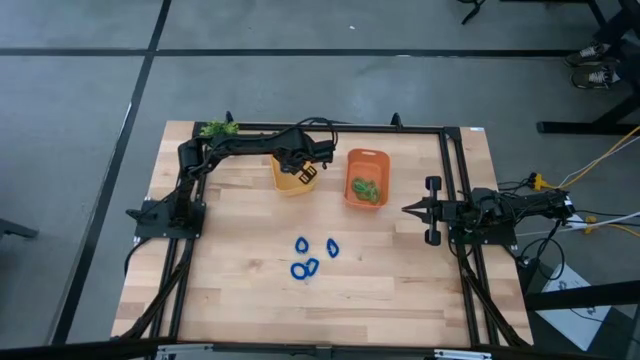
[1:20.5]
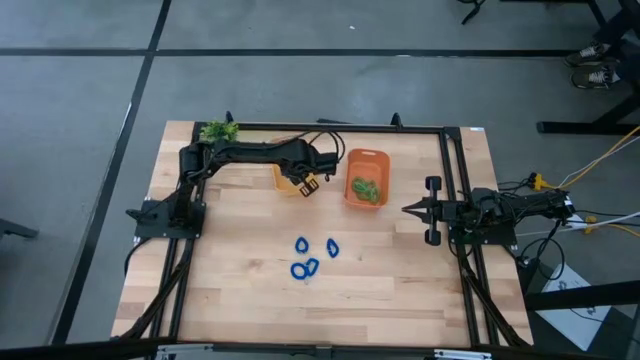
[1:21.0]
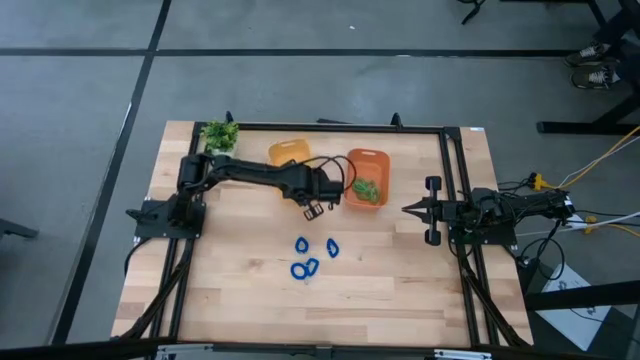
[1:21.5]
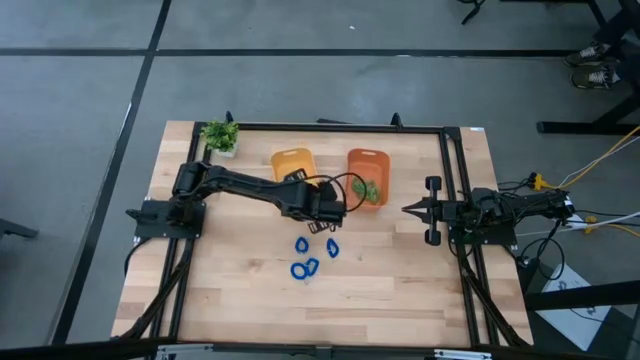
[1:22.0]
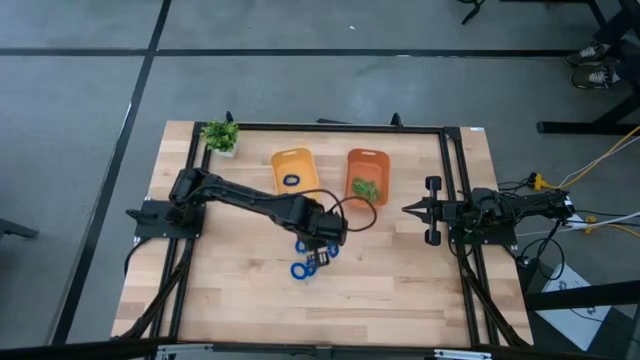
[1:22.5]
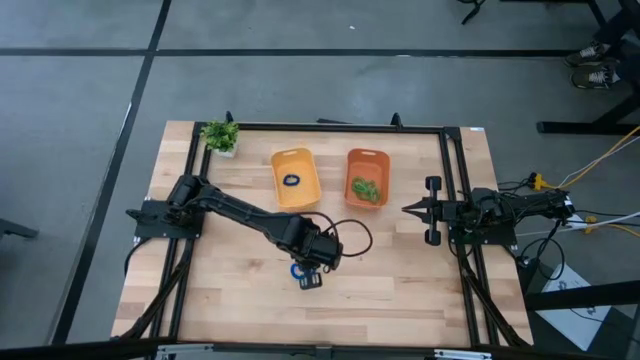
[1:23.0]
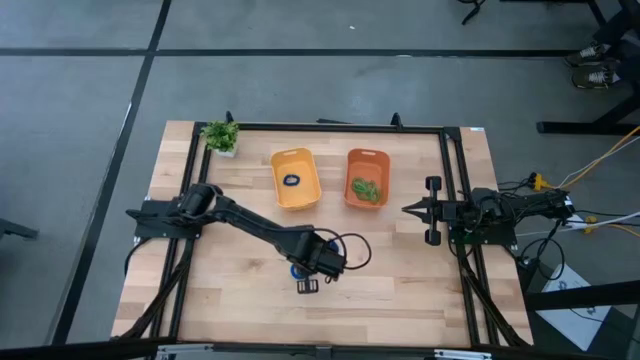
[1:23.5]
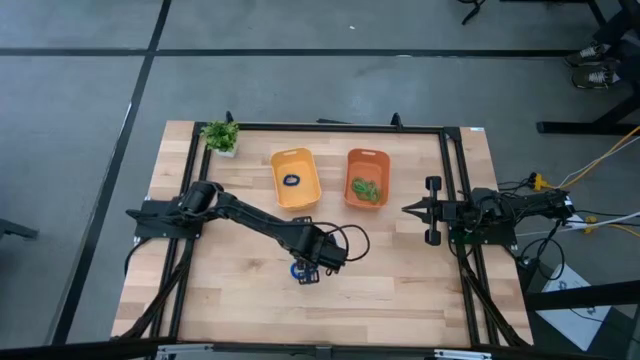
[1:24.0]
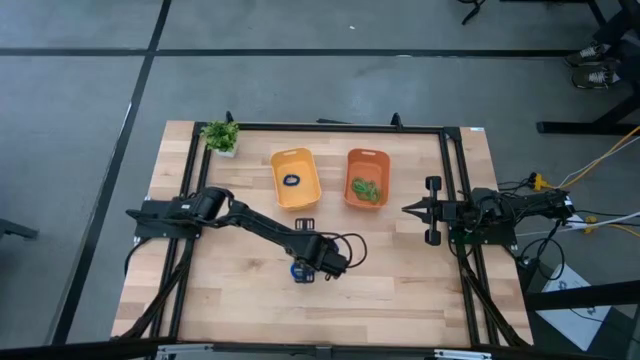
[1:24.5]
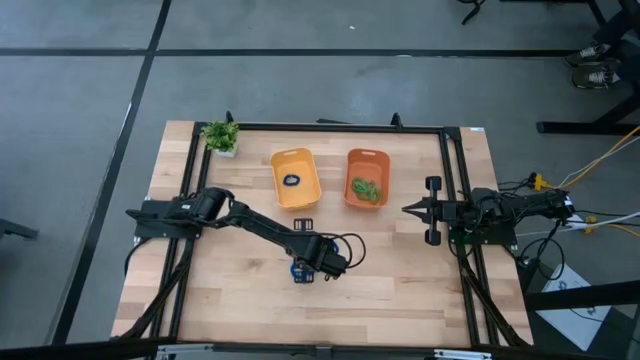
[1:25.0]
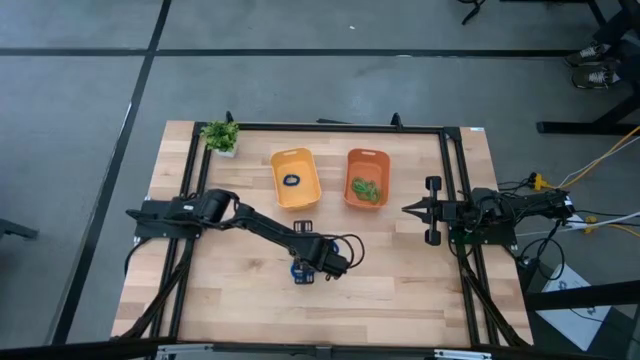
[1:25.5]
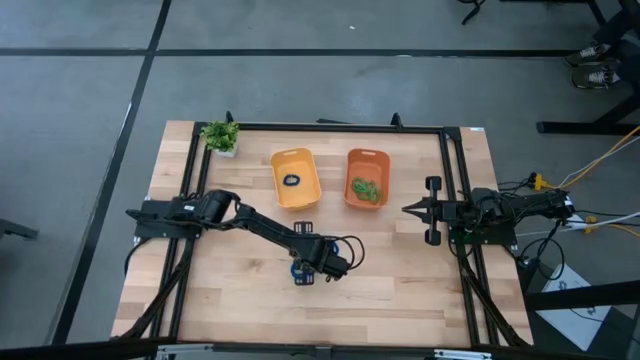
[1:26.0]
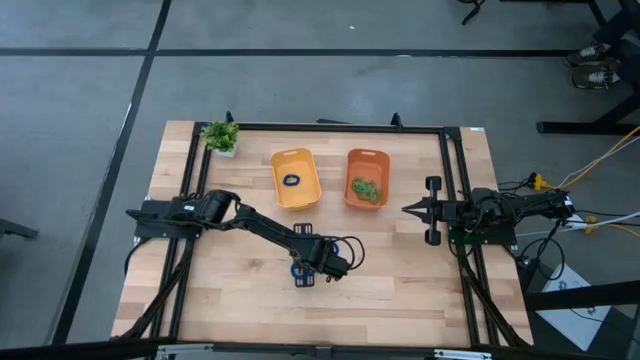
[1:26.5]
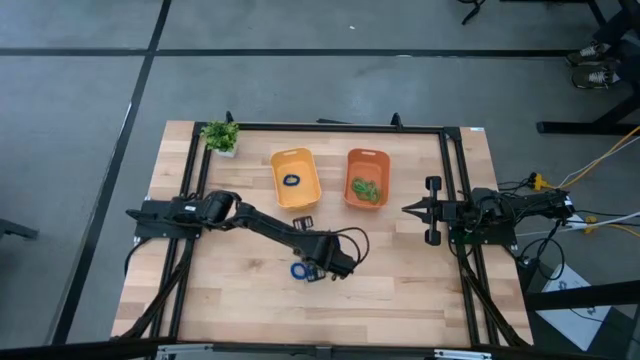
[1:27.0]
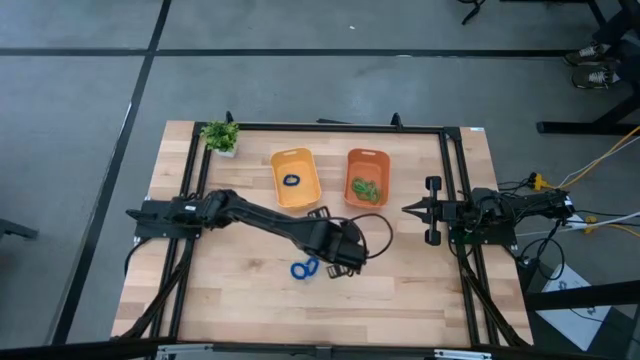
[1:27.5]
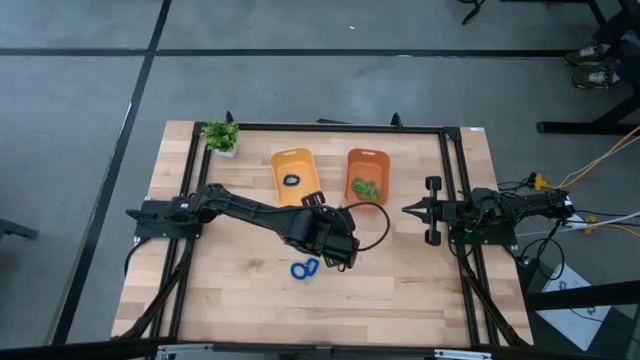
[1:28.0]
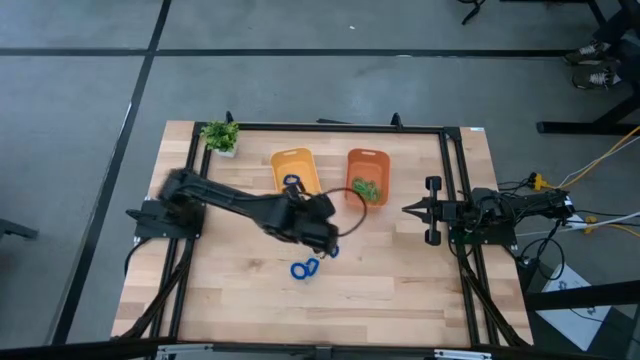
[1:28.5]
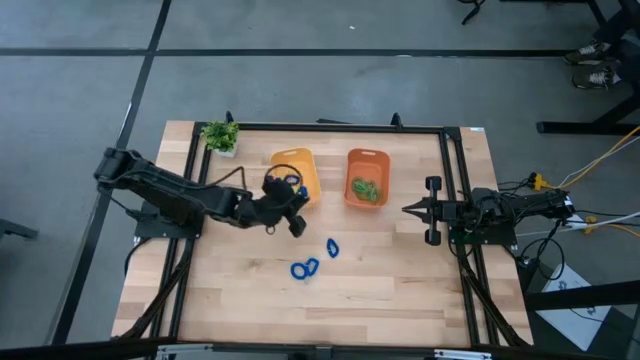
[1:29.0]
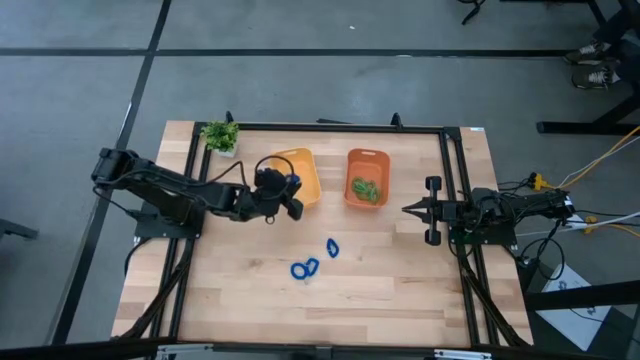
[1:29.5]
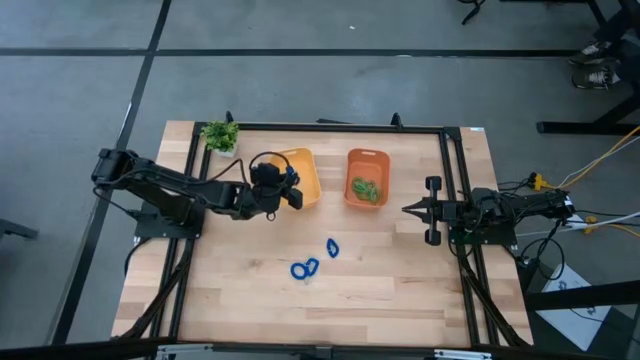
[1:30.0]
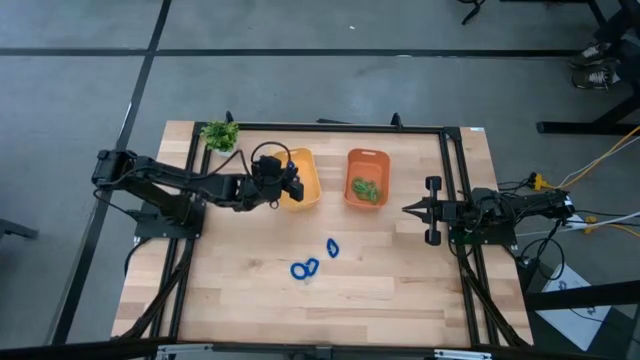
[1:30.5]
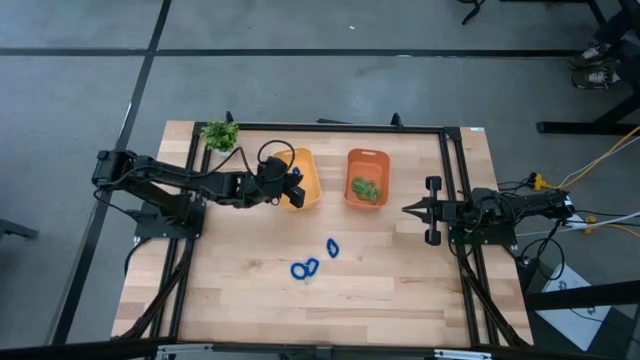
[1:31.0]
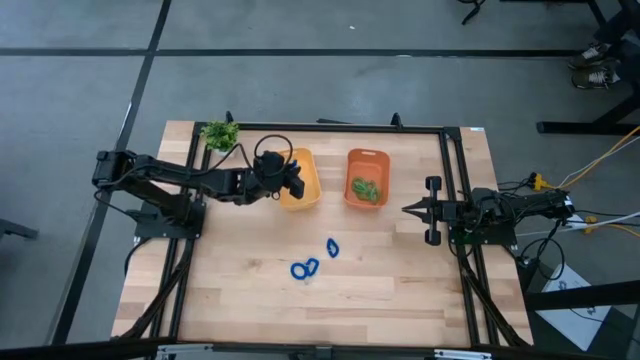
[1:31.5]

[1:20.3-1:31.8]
Task: Sort spring keychains
Put the blue spring keychain into the yellow bin

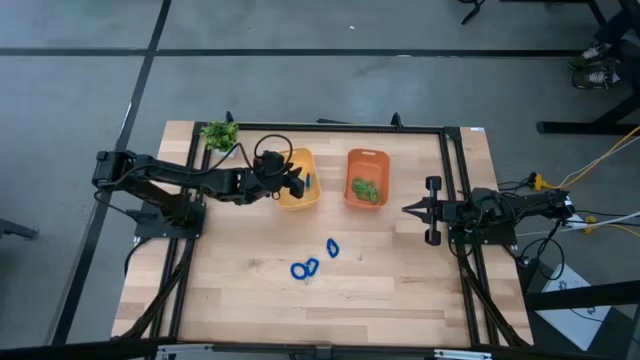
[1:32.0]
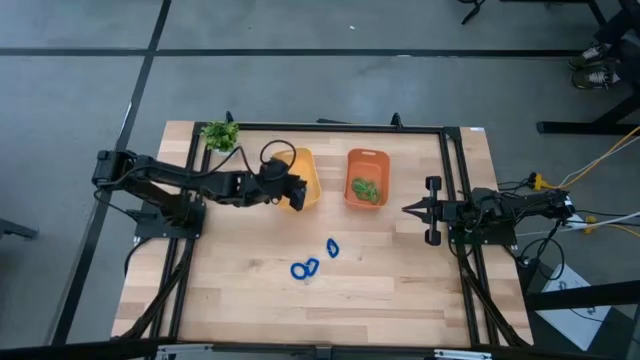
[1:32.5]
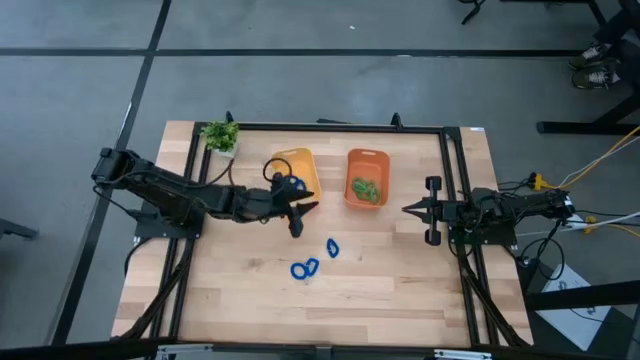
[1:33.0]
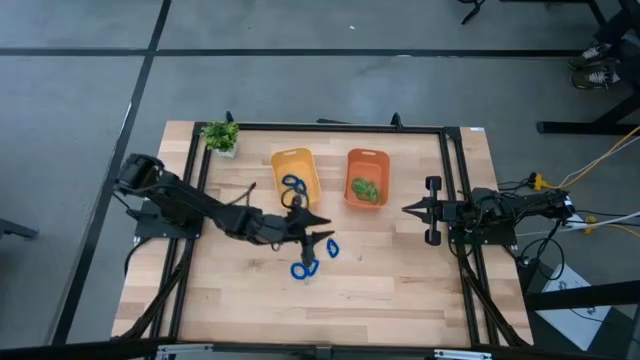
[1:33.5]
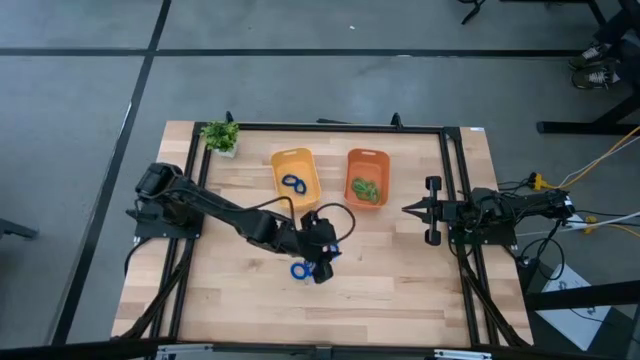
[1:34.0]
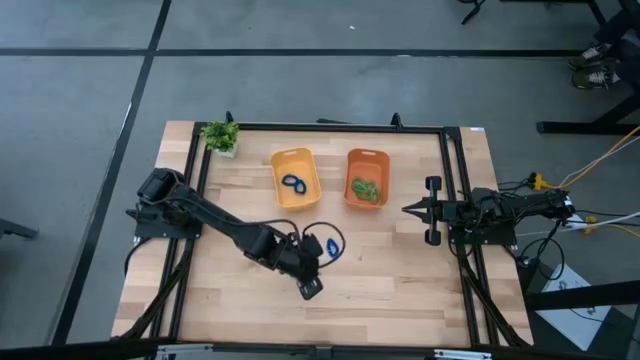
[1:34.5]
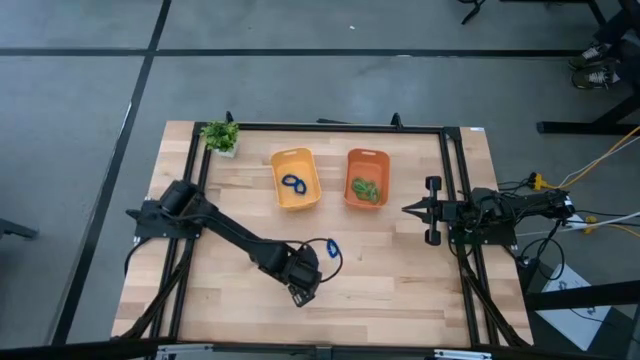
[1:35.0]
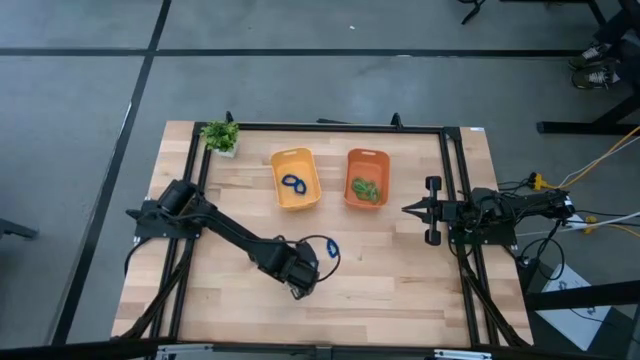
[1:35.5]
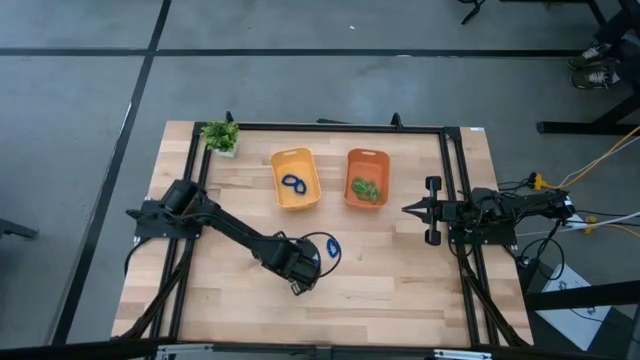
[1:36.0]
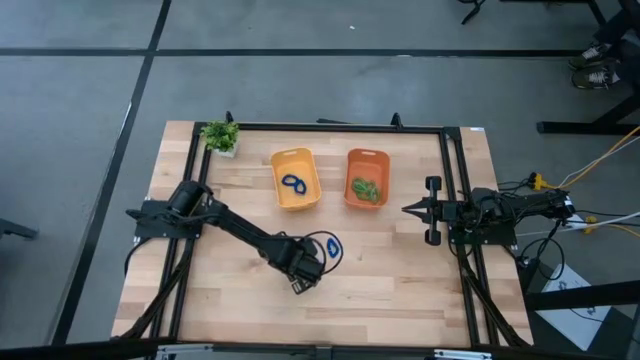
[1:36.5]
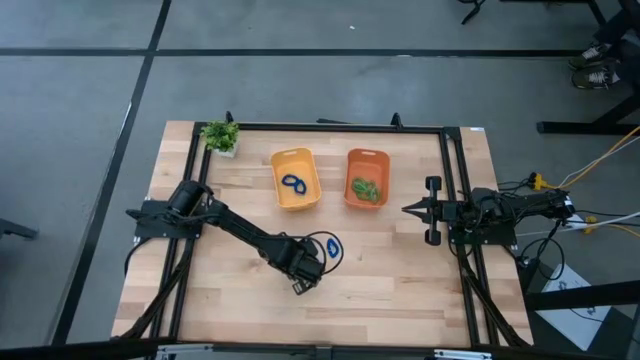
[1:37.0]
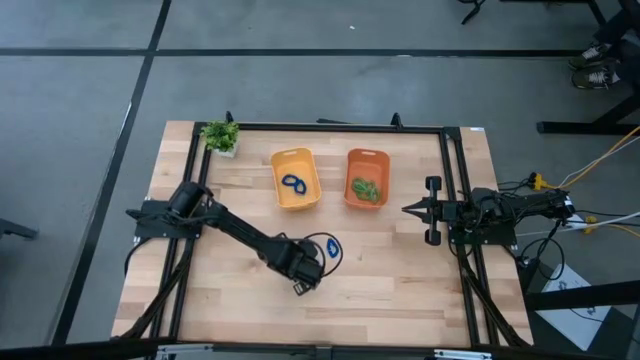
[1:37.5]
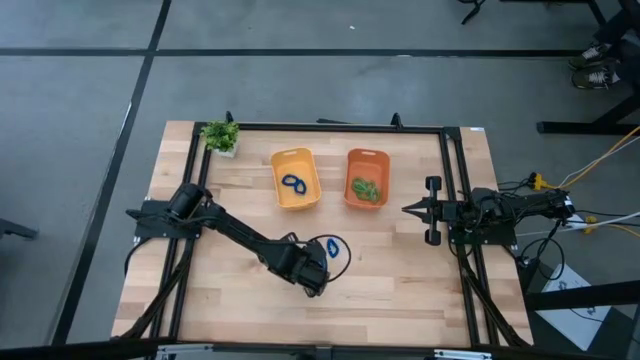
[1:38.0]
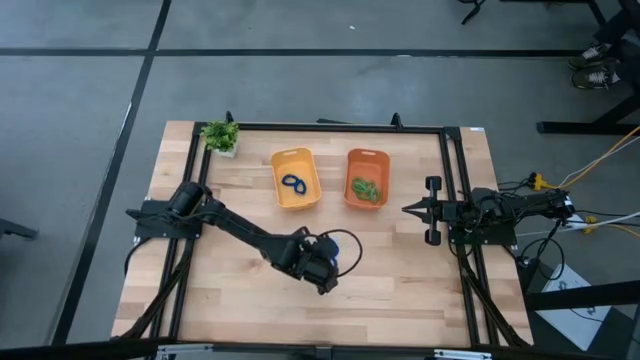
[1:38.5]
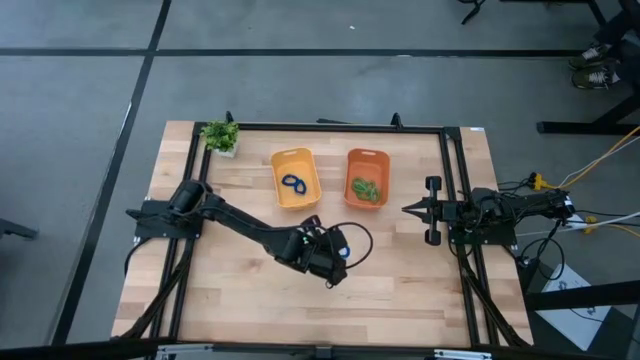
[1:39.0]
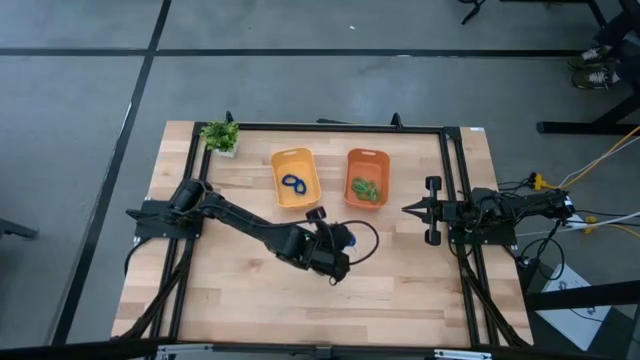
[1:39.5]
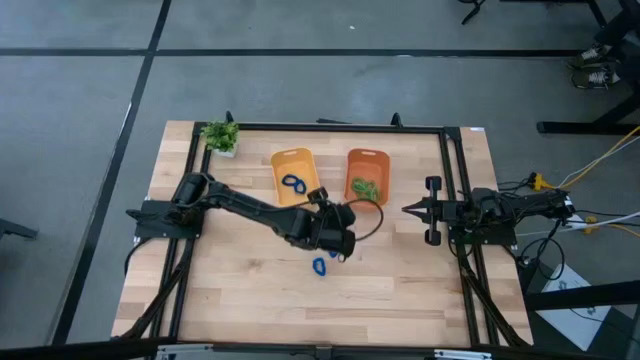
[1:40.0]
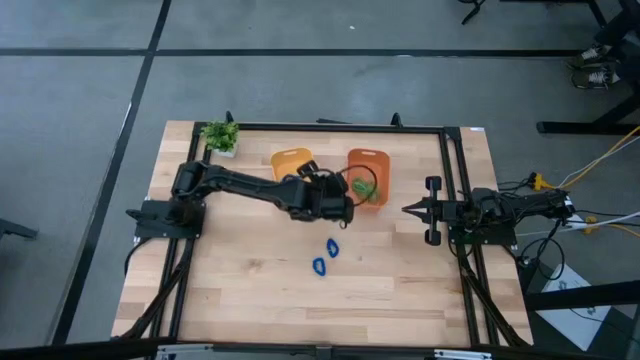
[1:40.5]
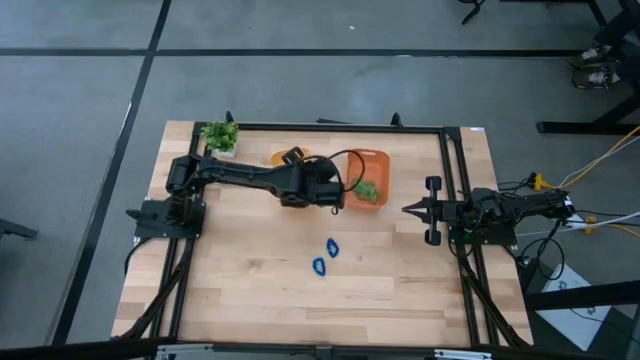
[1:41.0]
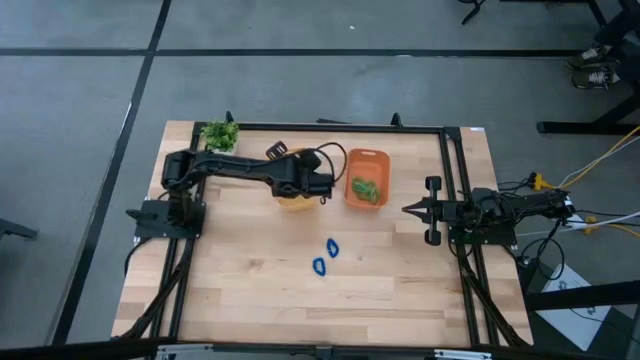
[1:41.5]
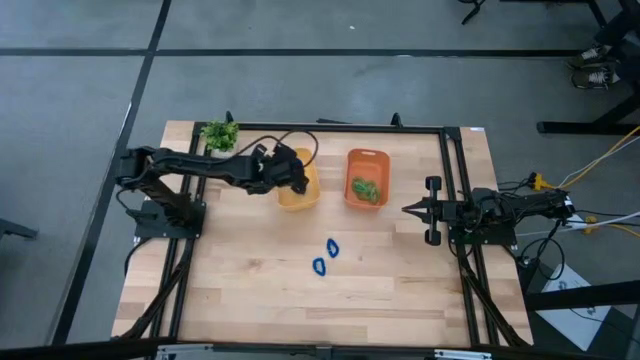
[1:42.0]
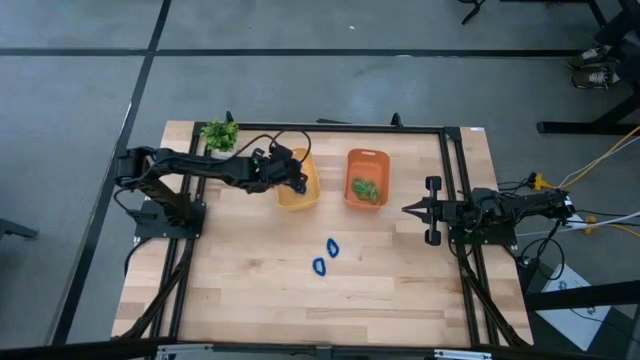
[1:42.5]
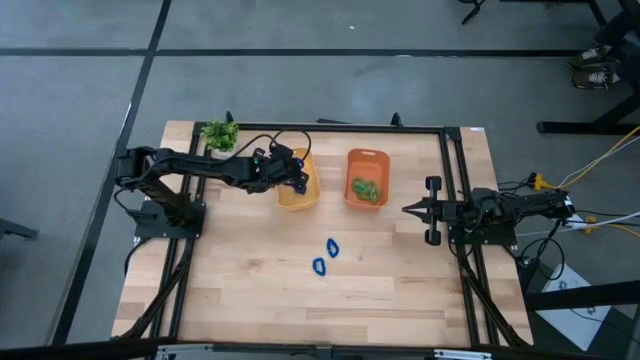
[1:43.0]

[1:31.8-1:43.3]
Put the blue spring keychain into the yellow bin
